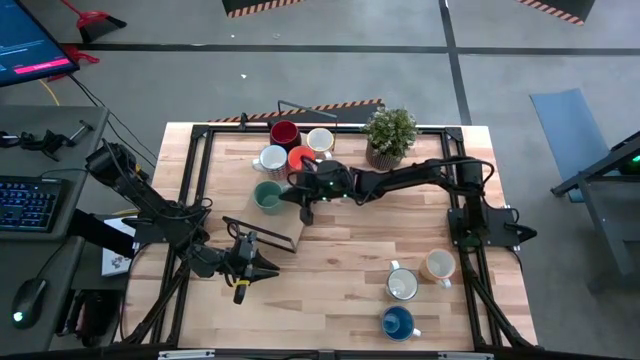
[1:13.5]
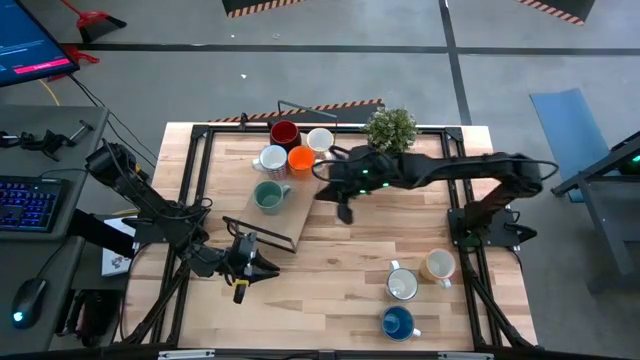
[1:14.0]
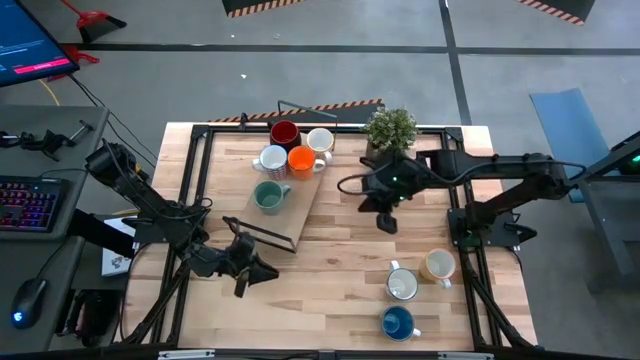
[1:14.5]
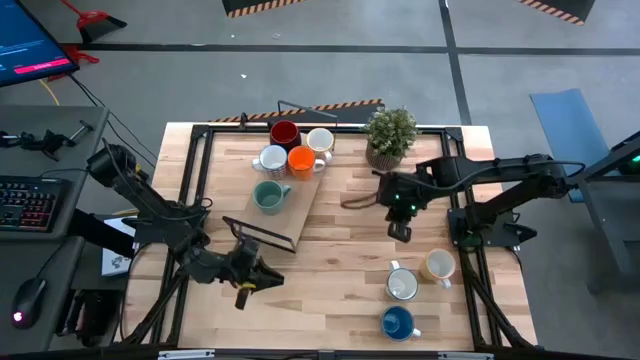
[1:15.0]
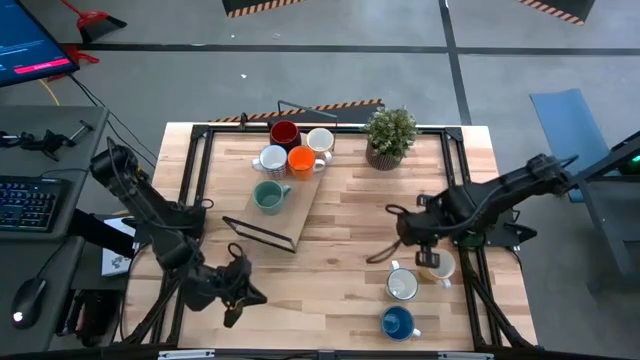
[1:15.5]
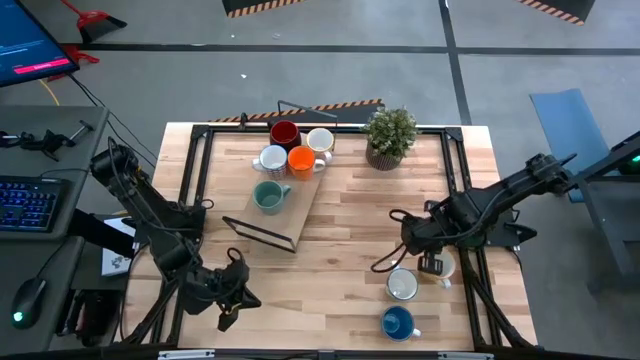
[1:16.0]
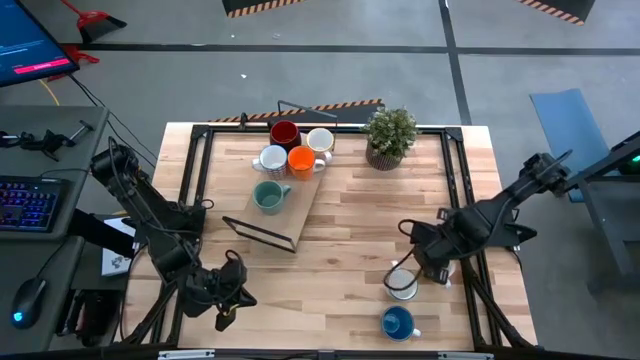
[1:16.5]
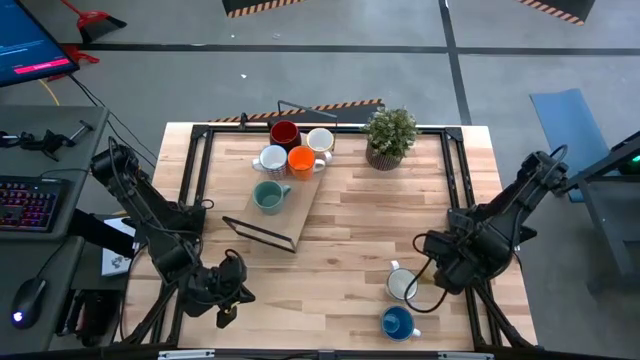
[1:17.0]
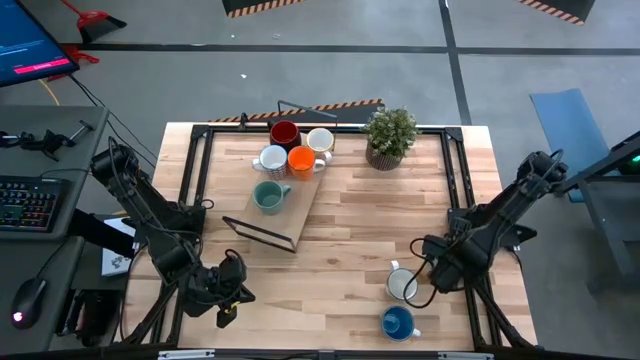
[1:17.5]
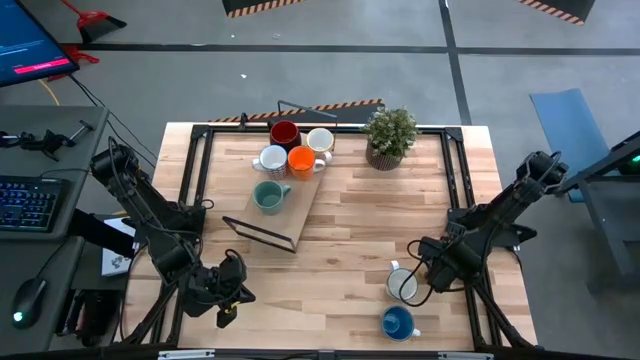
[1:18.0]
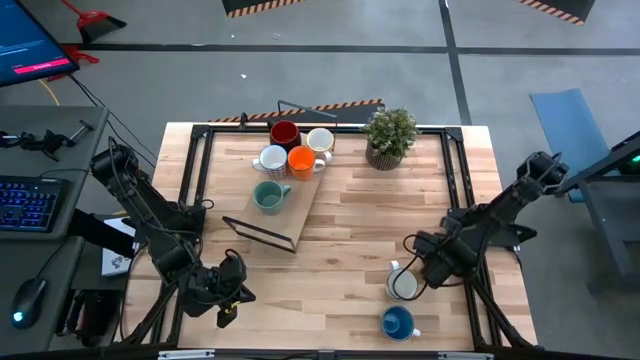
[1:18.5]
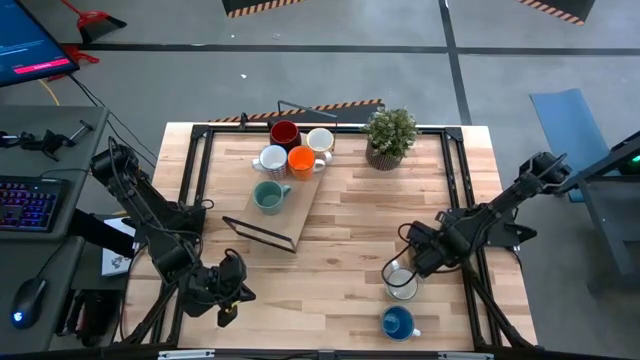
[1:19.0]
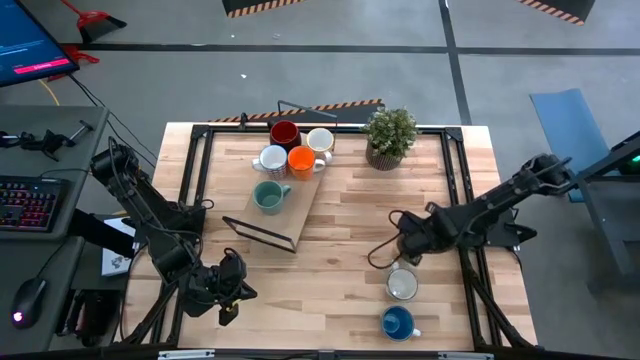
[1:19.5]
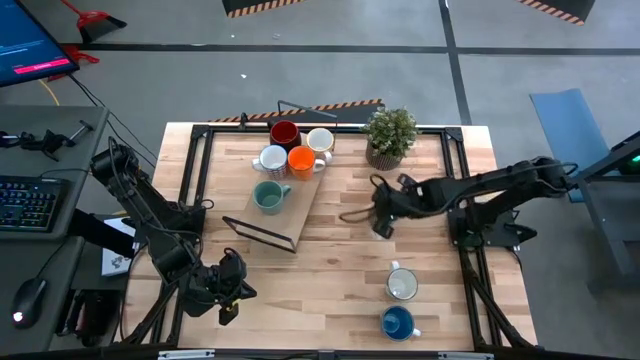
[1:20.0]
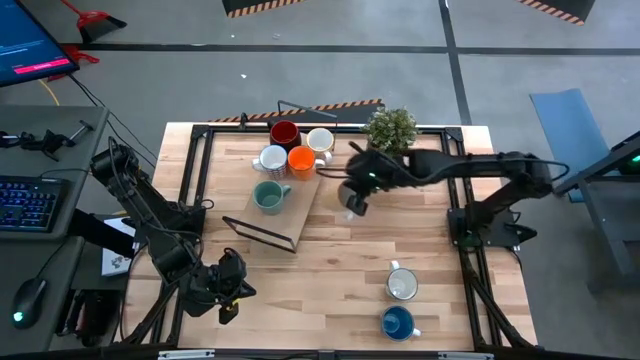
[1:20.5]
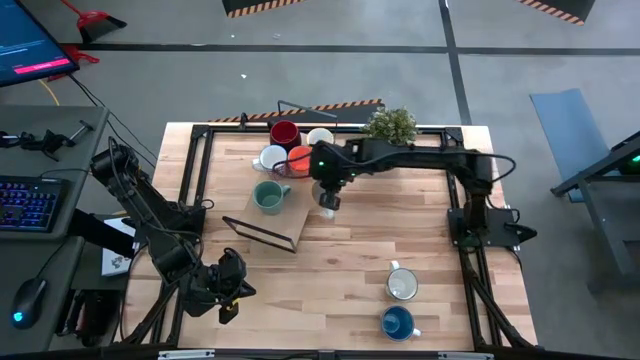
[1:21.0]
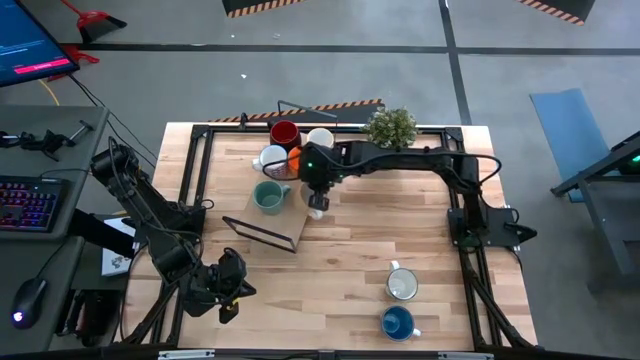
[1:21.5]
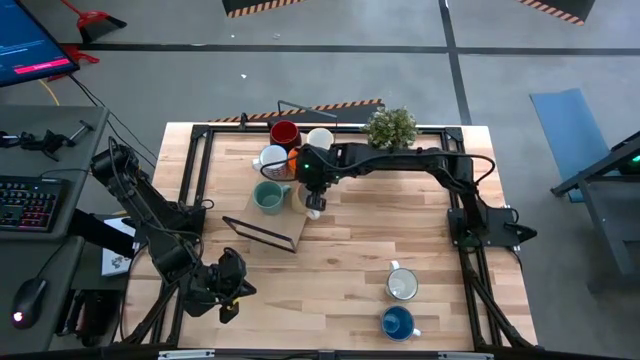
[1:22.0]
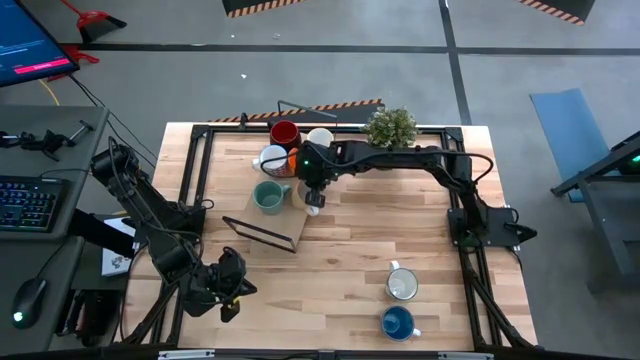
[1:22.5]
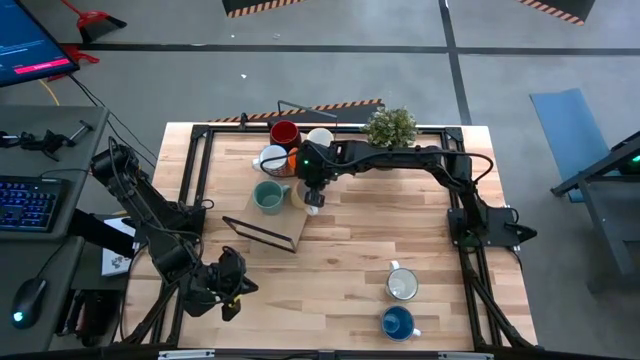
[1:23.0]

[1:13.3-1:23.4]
Task: Place coffee mugs
Put the yellow cup on the shelf

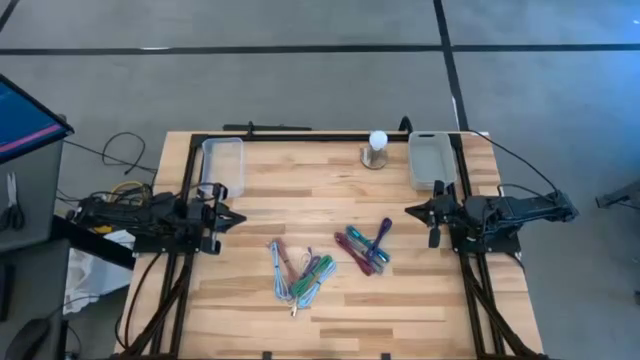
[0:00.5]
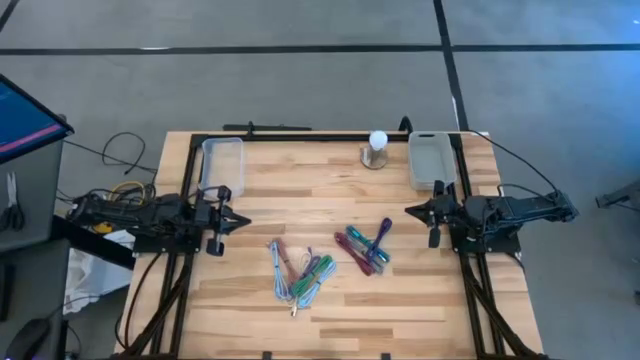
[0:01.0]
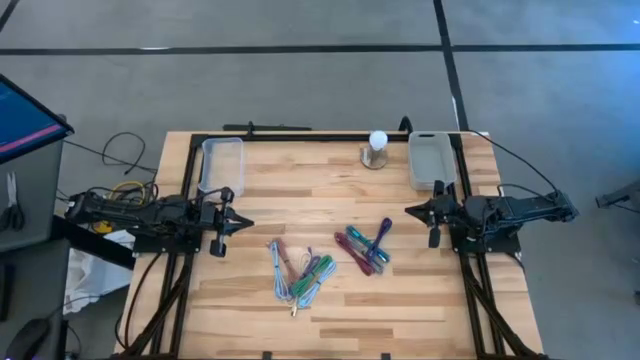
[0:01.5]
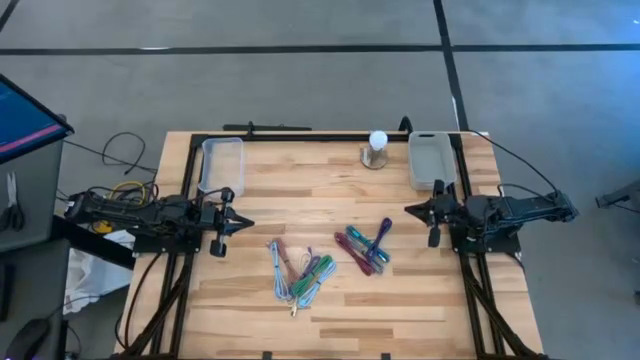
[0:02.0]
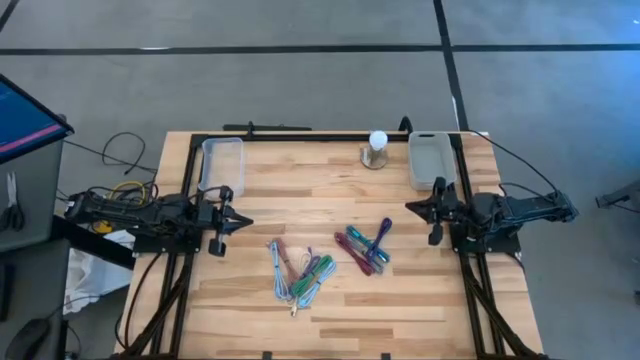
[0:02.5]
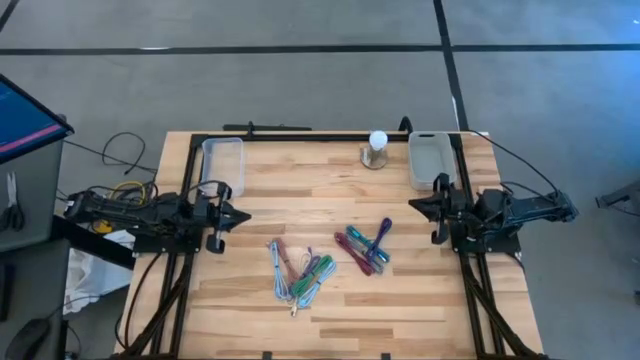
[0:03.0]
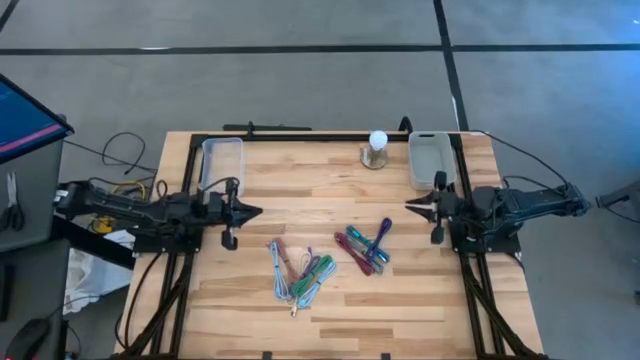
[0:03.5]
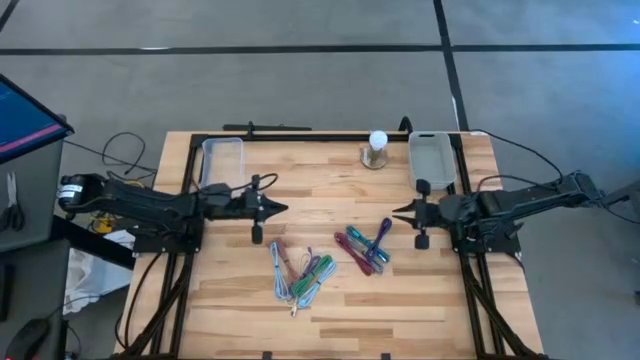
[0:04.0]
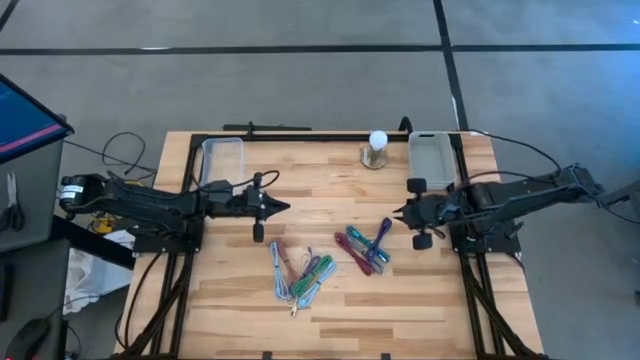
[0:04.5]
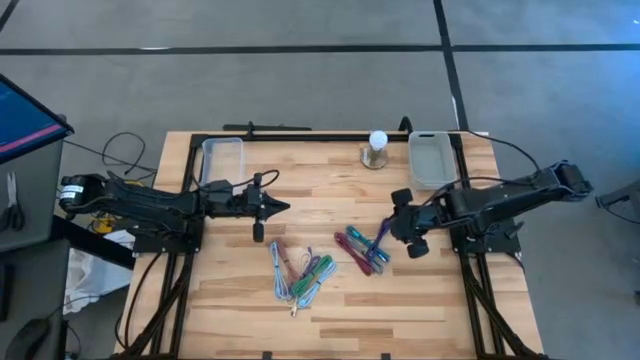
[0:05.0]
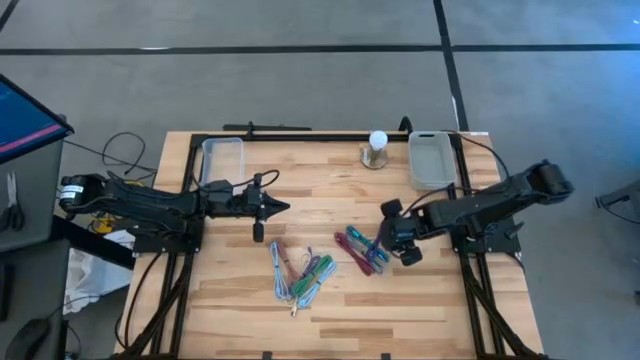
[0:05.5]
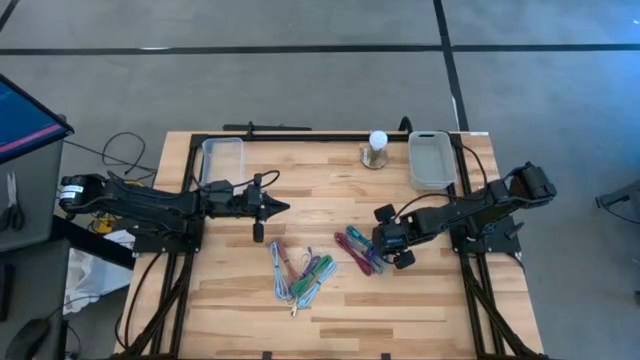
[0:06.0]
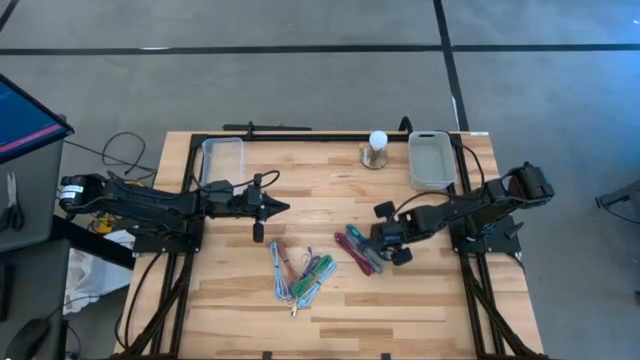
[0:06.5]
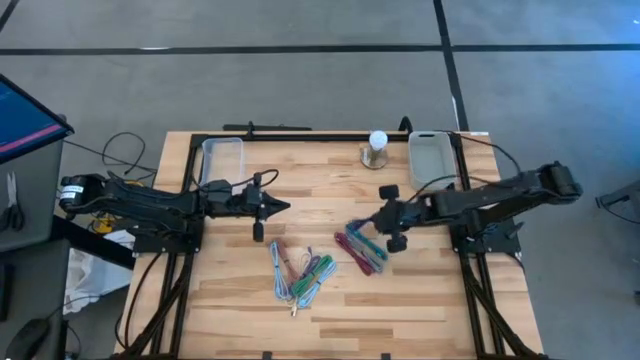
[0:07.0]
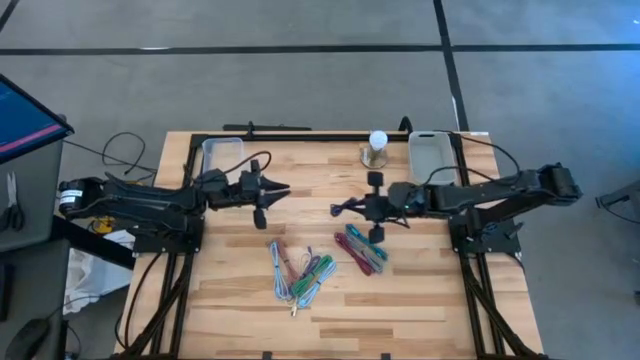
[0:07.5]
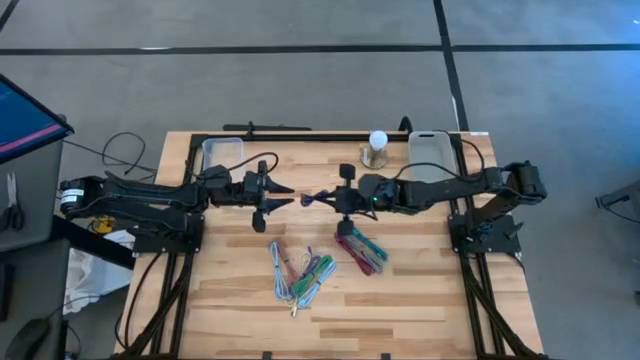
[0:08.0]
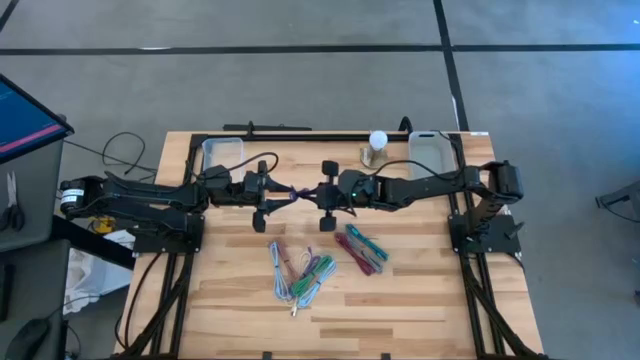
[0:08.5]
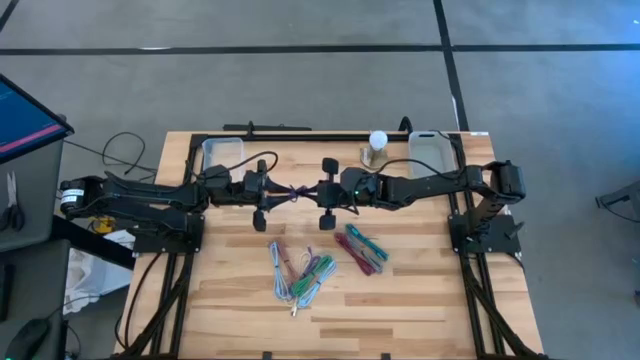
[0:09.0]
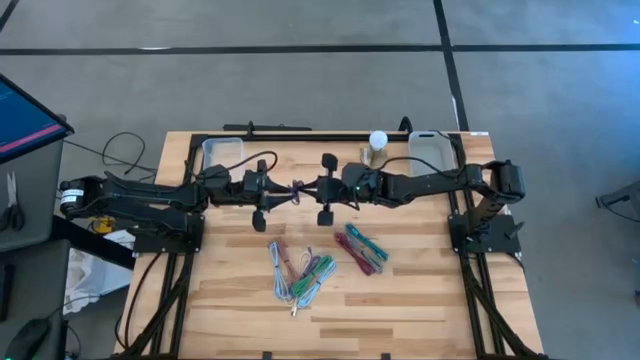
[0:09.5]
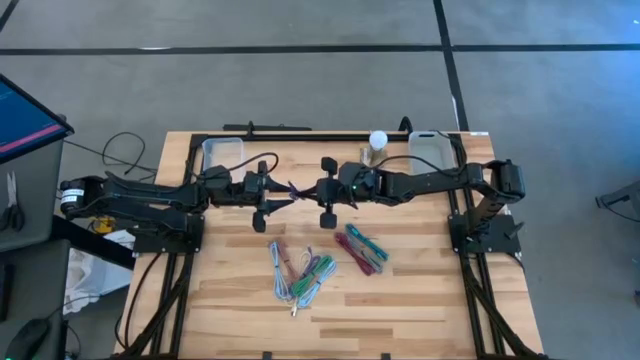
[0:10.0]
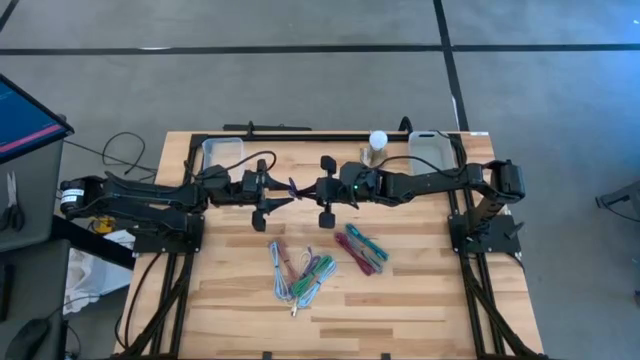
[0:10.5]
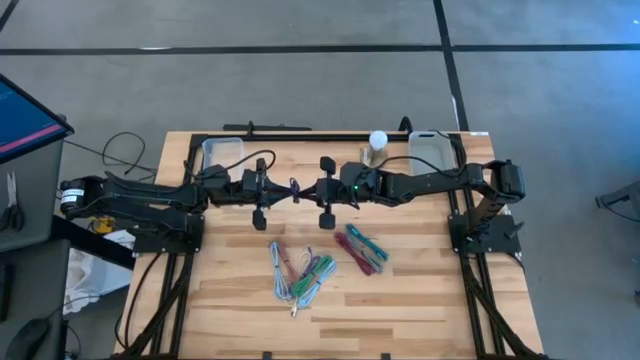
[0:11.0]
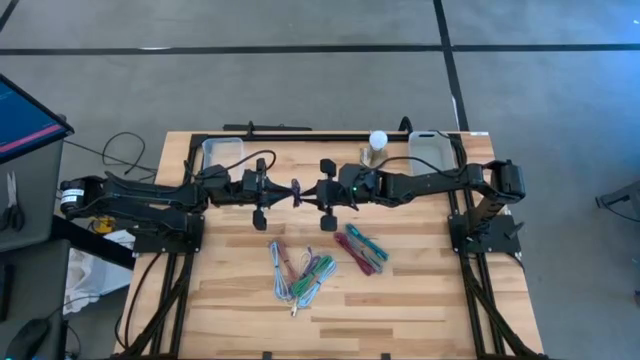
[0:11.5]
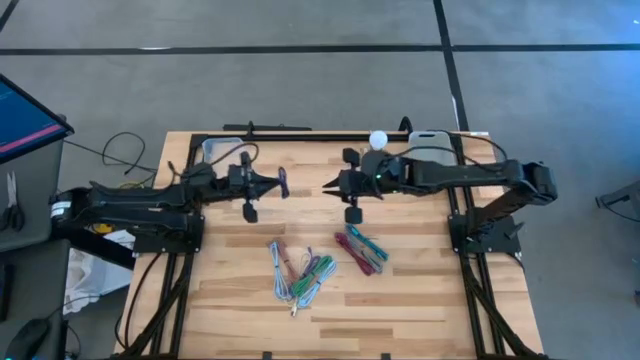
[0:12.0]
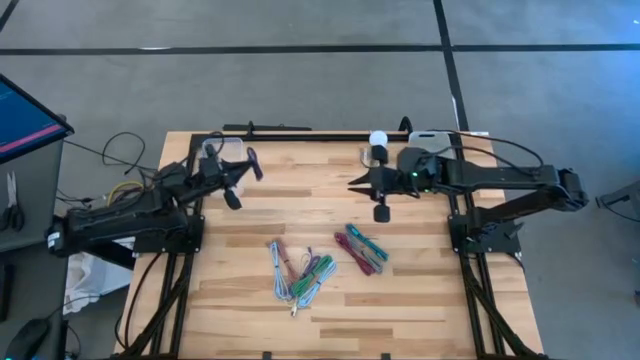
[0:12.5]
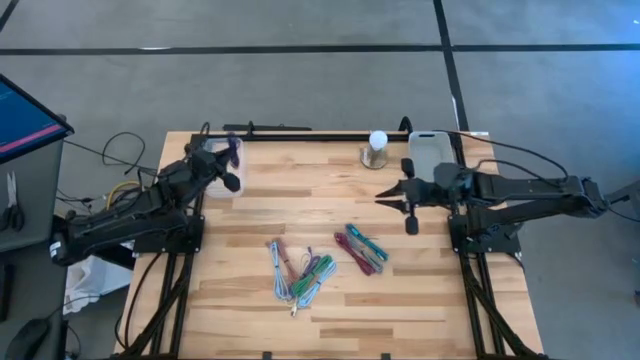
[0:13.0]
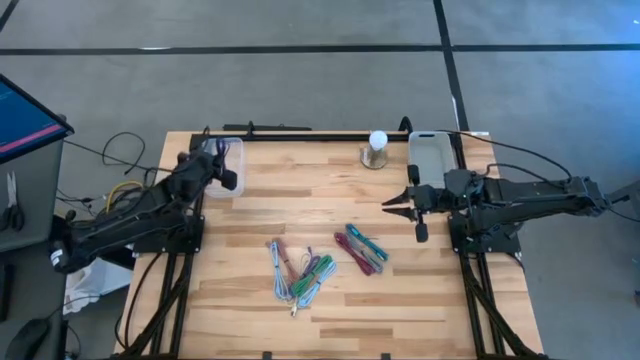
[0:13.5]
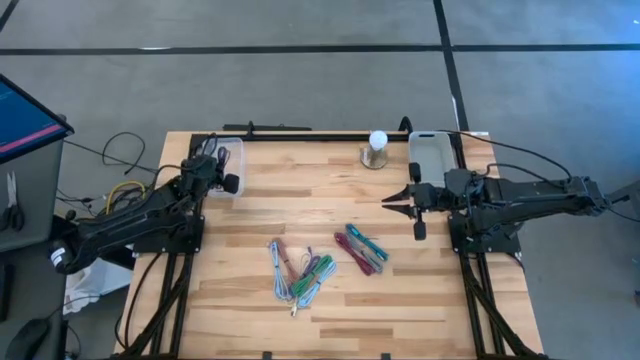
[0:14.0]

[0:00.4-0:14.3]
Task: Pick & Place USB Port
Put the violet and black charger cable into the transparent bin
